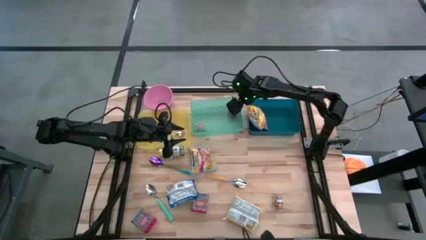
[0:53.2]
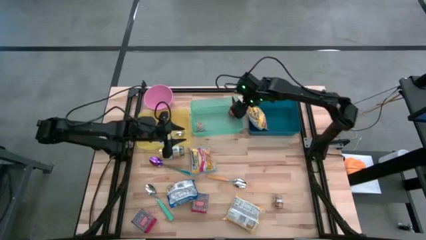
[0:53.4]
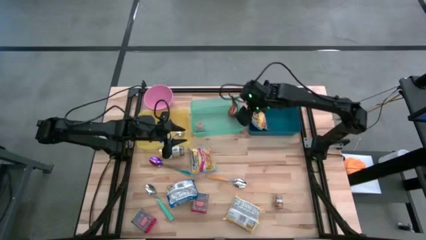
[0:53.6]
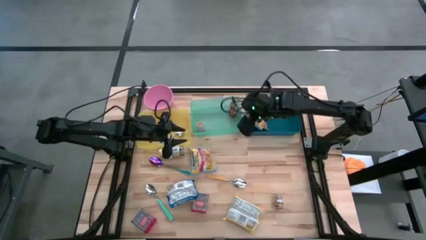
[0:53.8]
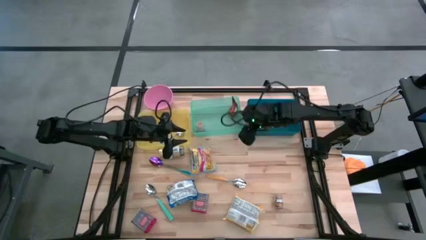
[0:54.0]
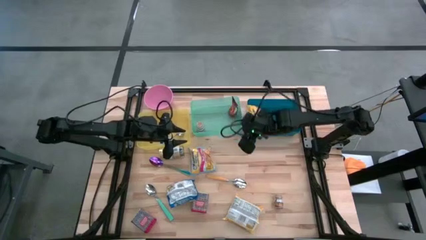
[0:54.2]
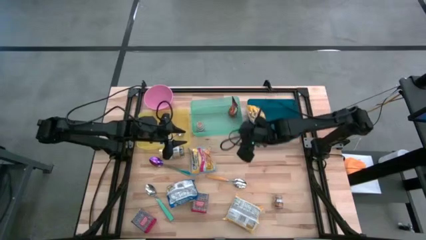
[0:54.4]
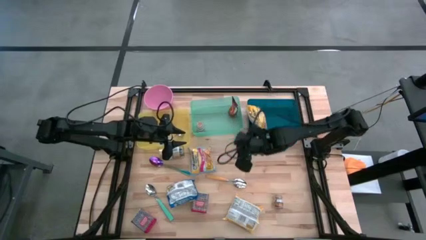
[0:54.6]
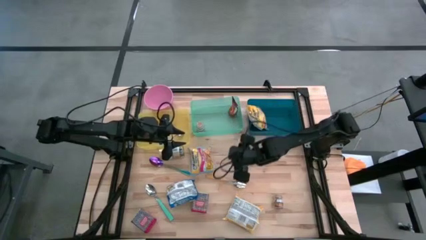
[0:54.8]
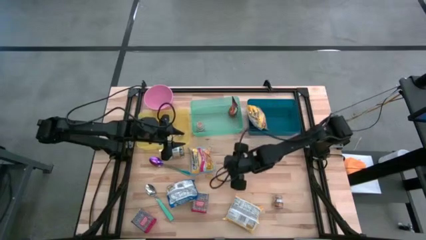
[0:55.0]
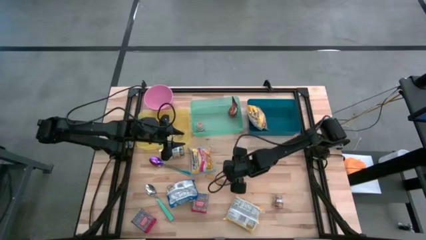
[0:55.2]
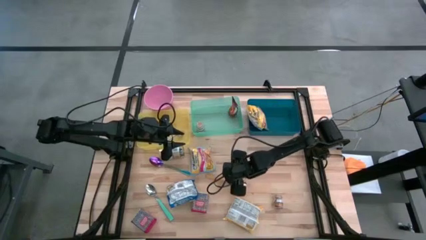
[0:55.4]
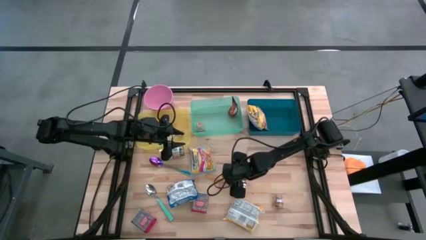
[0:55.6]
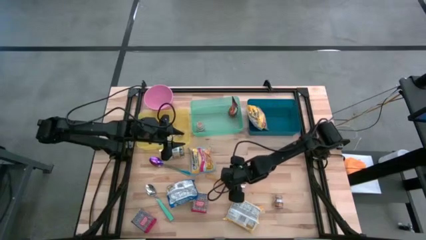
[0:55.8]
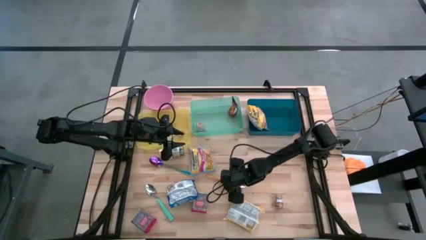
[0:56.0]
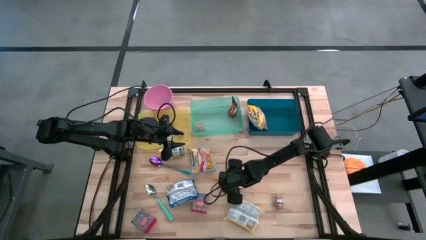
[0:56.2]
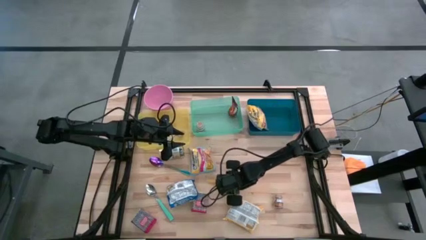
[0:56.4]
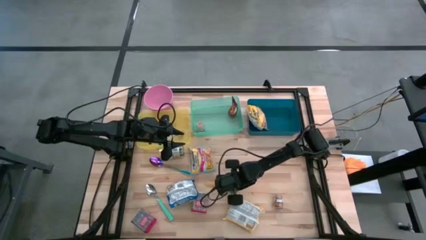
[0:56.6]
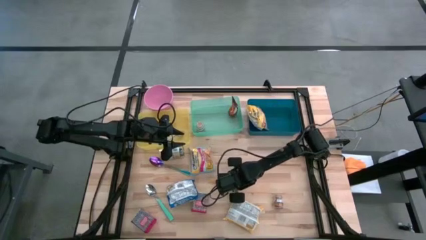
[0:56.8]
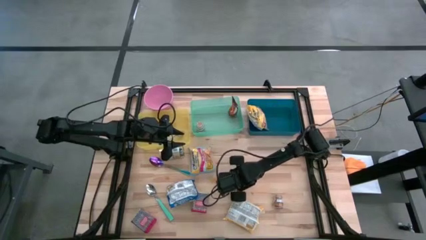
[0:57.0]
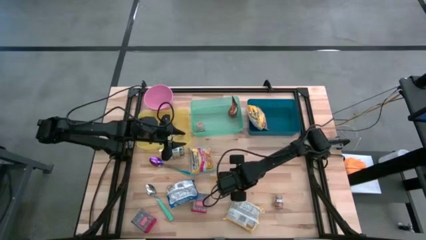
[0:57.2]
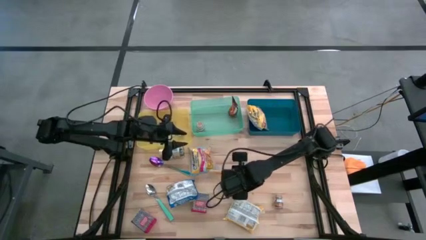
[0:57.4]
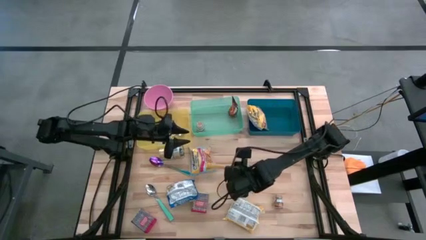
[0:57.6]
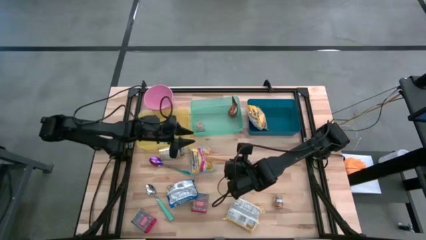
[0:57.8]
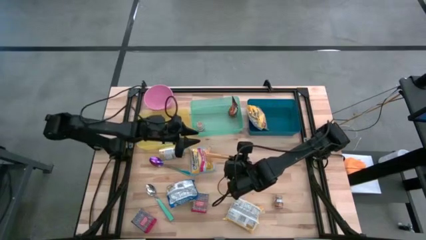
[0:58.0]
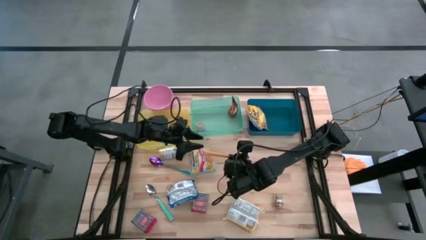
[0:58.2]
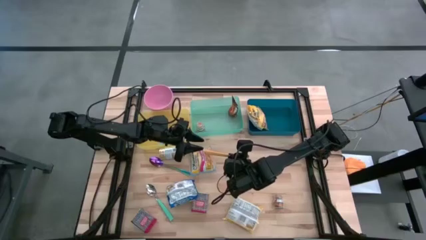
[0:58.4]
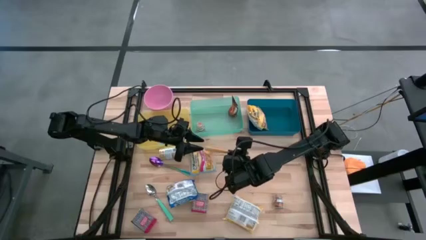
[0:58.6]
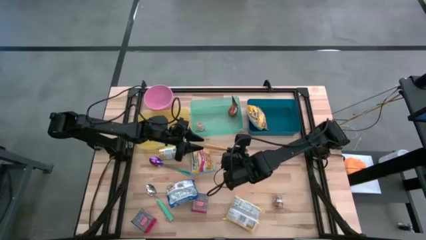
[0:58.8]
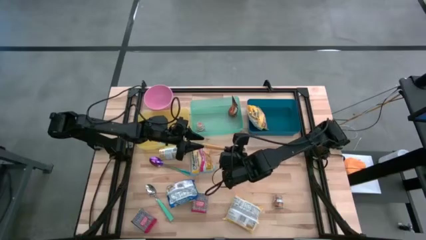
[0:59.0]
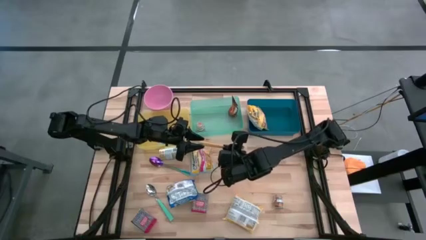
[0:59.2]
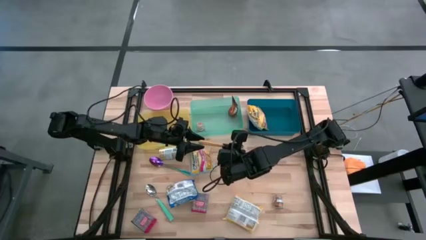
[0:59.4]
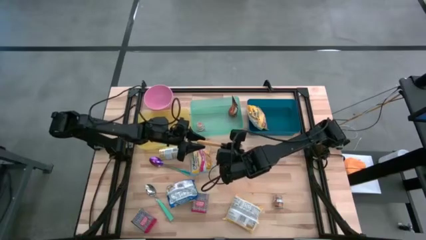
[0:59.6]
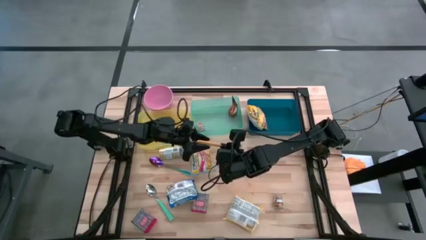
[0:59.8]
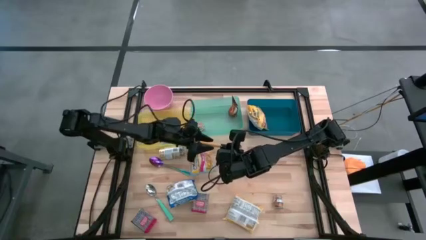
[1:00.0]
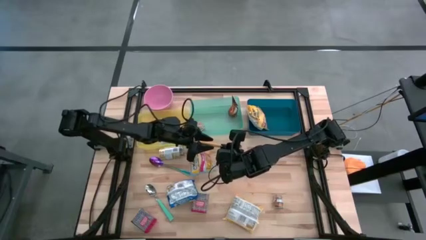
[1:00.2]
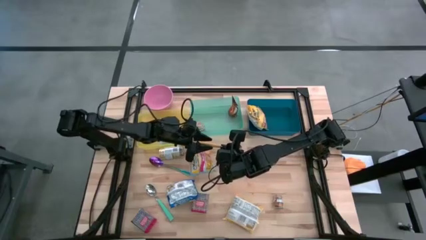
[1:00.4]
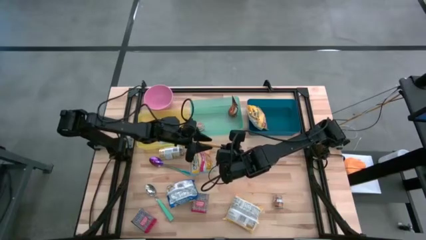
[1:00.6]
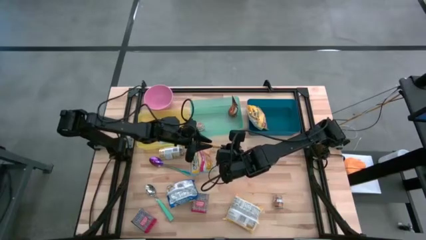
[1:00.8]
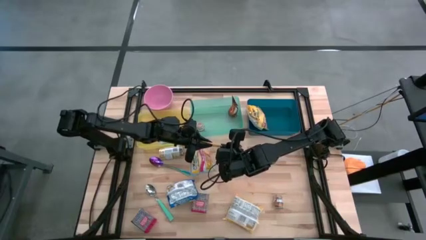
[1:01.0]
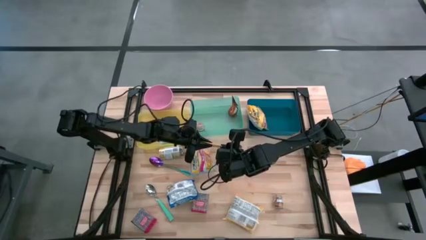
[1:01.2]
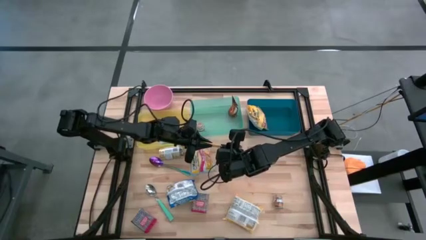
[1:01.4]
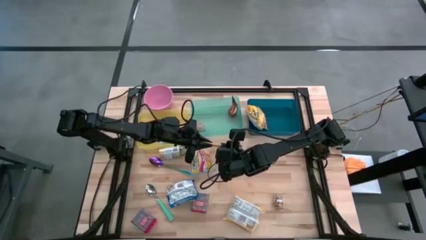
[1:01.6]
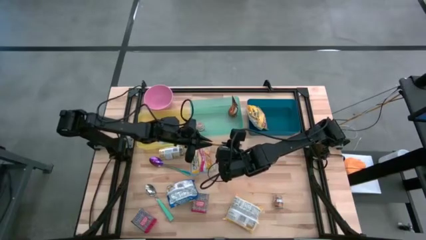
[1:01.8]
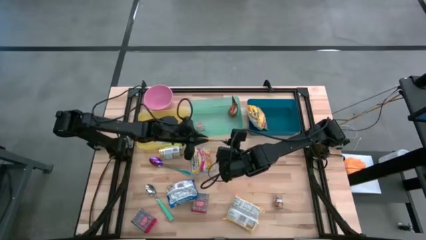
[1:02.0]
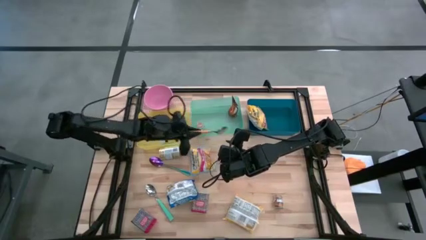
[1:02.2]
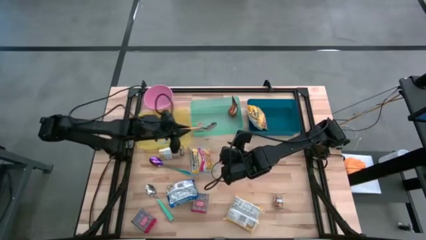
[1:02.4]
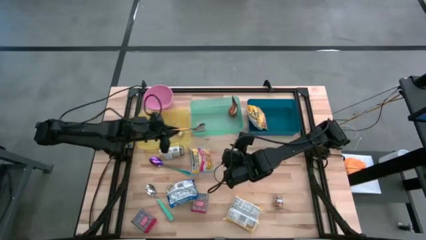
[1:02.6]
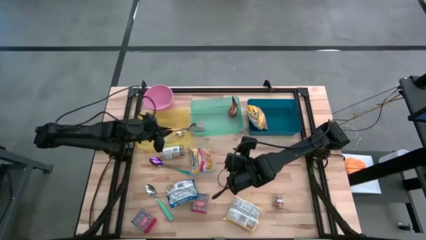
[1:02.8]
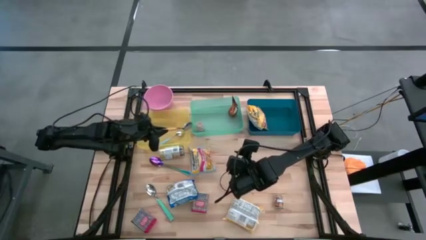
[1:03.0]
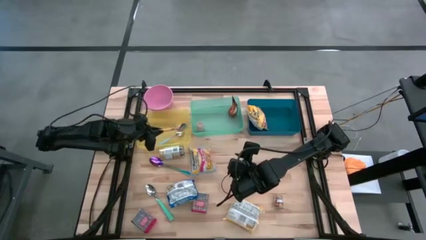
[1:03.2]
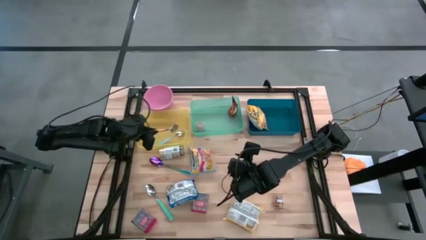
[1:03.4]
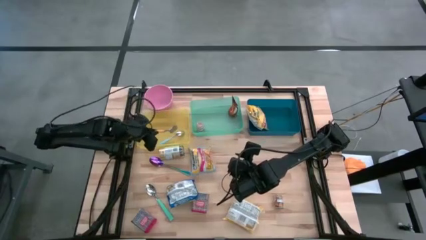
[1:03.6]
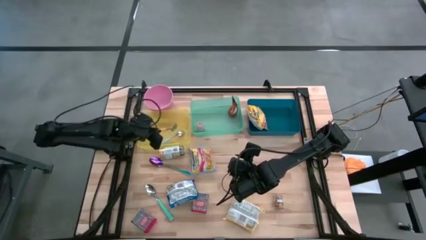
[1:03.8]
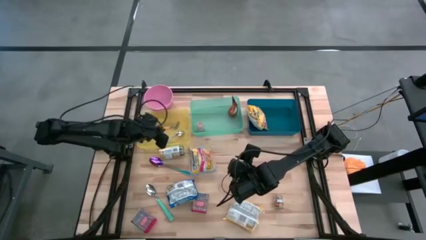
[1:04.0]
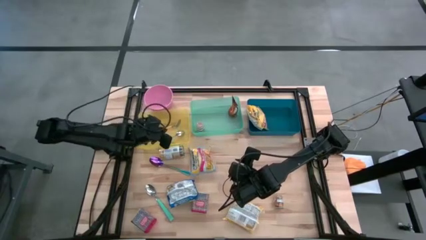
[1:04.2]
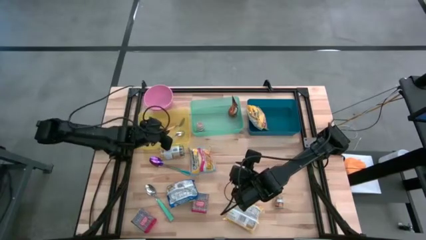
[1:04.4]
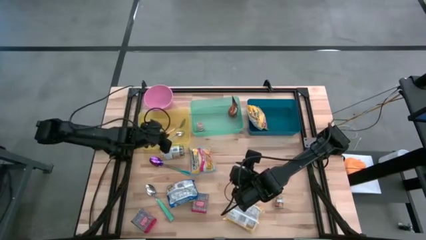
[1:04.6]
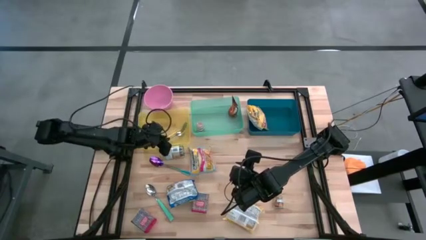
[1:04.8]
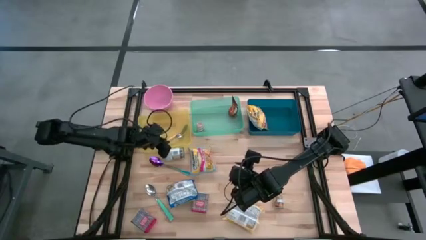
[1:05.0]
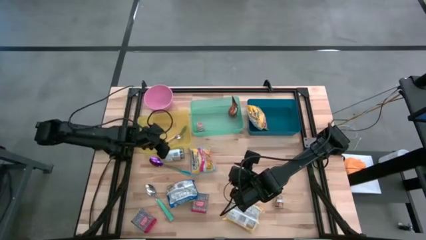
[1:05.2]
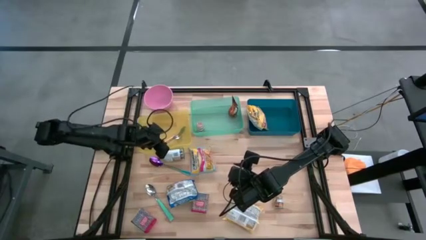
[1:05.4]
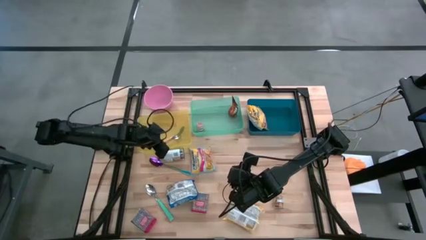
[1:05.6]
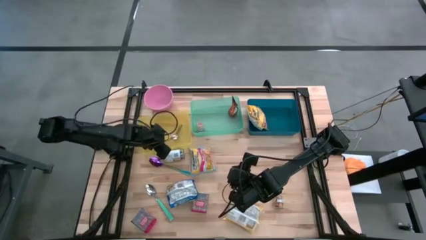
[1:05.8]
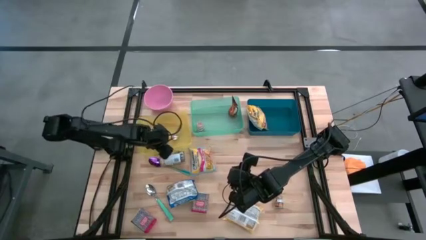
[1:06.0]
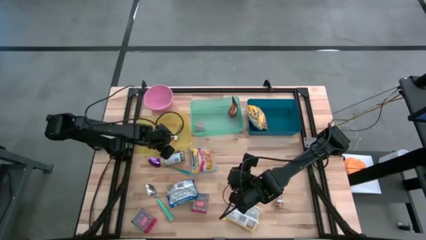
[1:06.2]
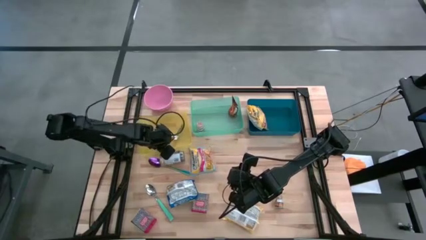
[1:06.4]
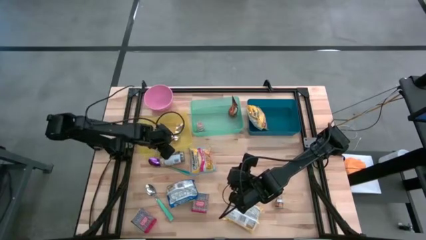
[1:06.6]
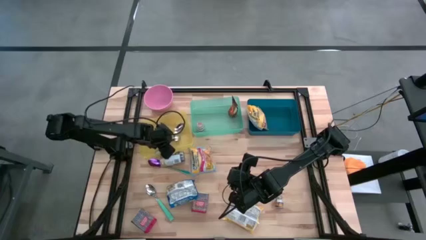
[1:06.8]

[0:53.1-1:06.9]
Put the yellow spoon into the yellow bin
